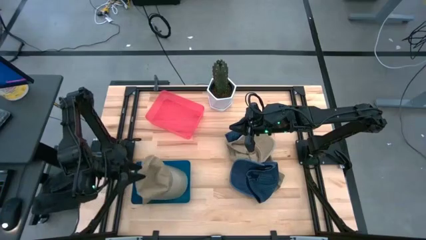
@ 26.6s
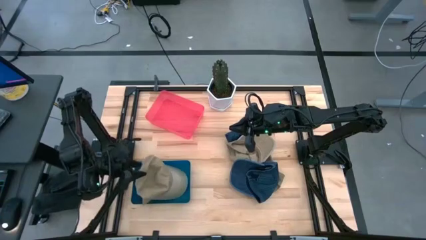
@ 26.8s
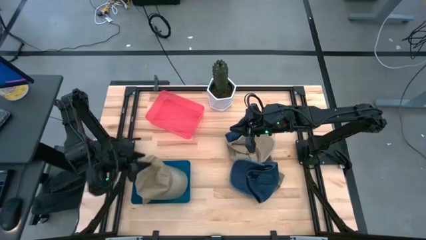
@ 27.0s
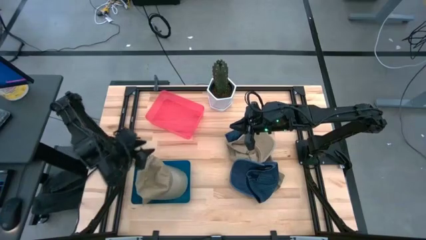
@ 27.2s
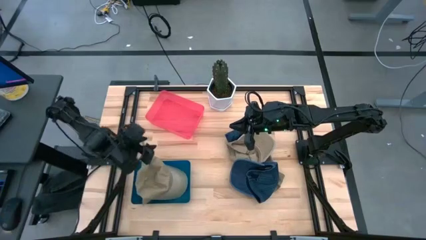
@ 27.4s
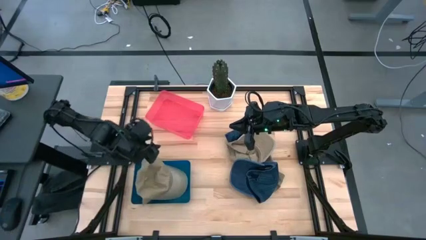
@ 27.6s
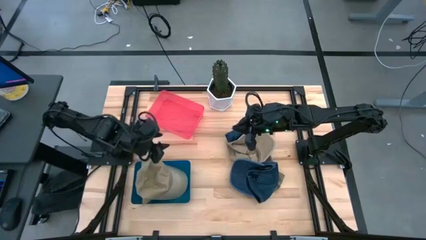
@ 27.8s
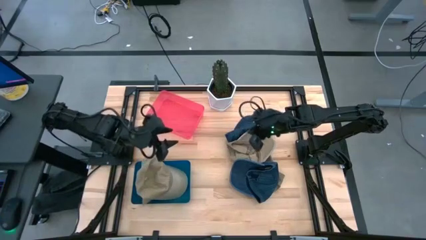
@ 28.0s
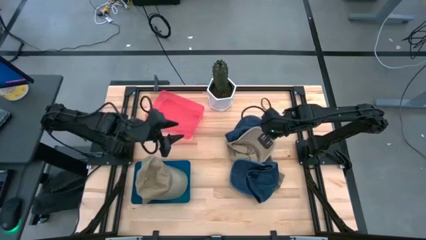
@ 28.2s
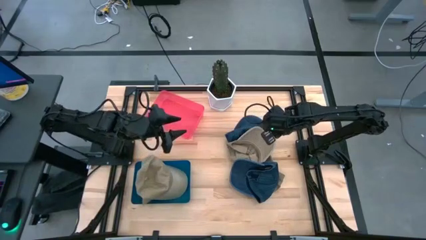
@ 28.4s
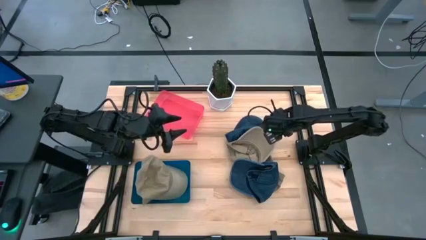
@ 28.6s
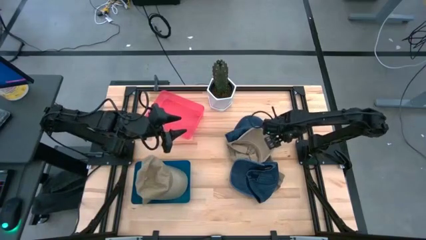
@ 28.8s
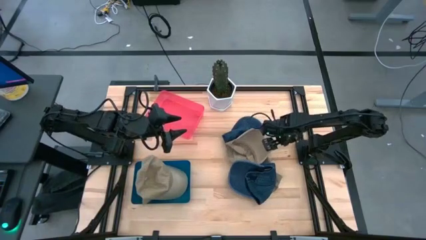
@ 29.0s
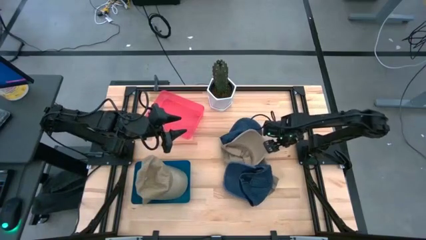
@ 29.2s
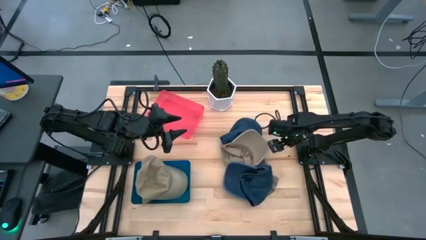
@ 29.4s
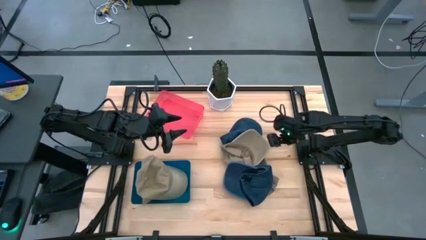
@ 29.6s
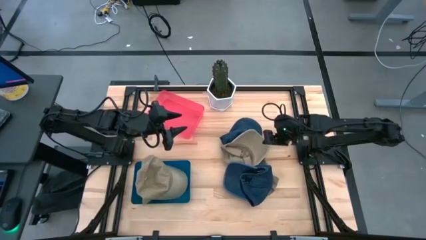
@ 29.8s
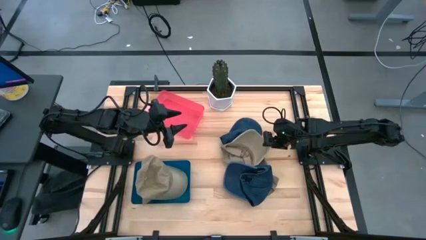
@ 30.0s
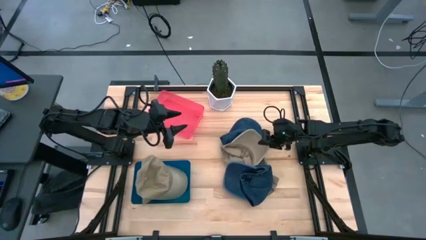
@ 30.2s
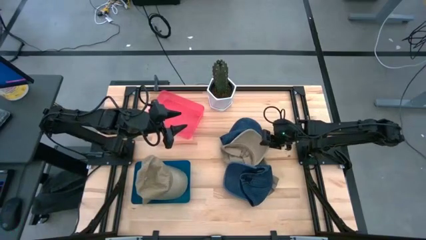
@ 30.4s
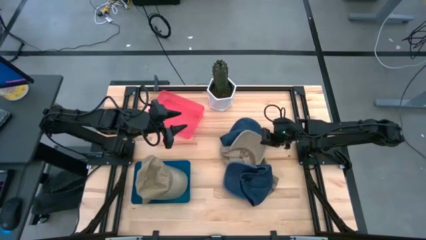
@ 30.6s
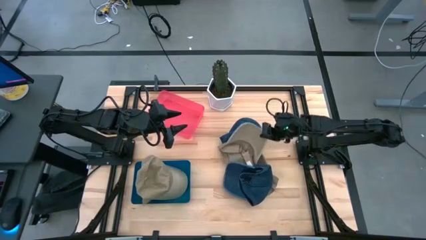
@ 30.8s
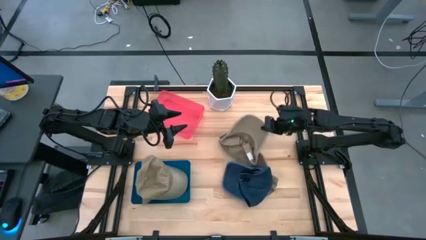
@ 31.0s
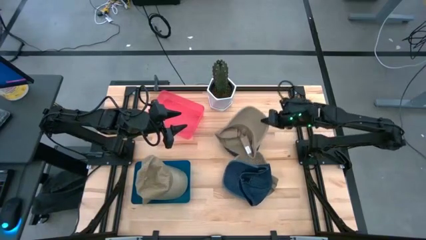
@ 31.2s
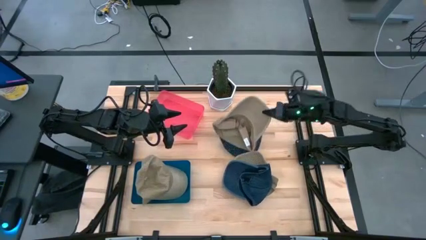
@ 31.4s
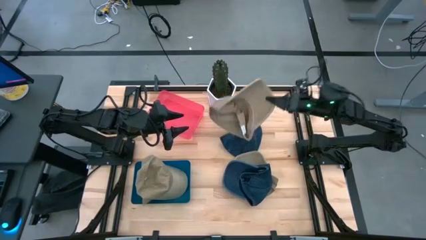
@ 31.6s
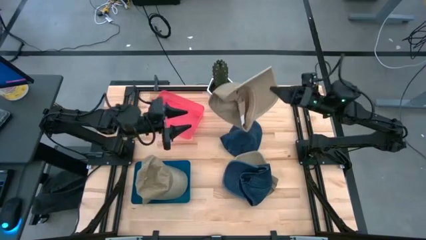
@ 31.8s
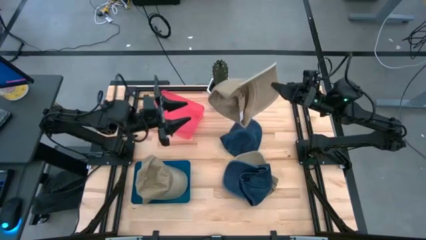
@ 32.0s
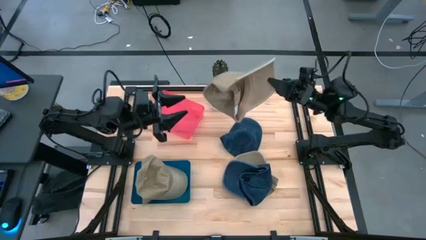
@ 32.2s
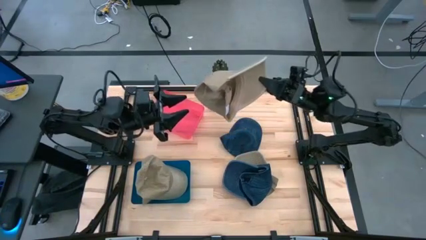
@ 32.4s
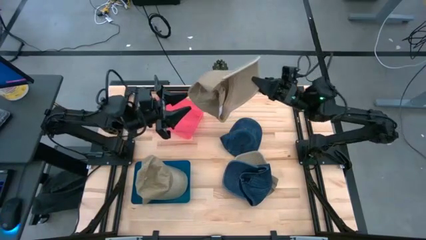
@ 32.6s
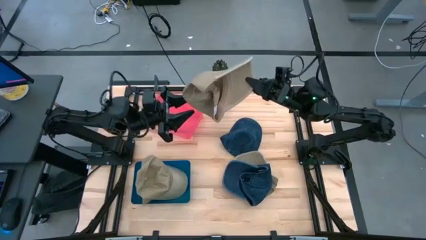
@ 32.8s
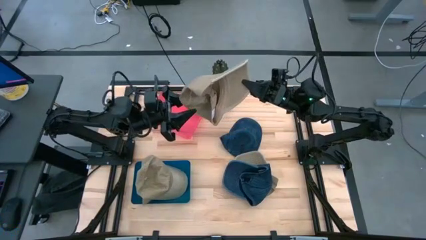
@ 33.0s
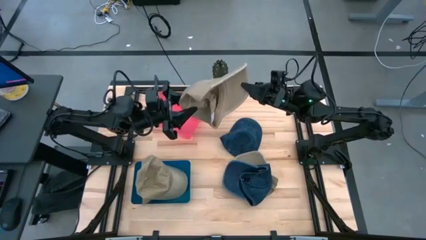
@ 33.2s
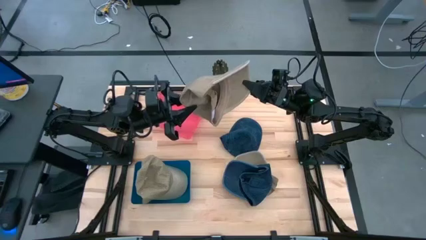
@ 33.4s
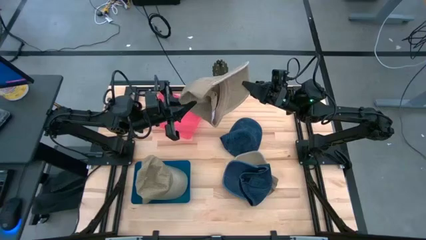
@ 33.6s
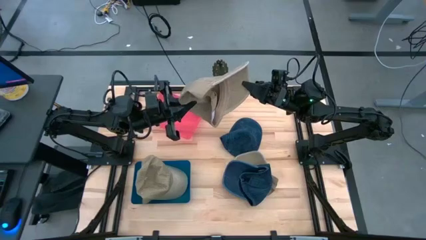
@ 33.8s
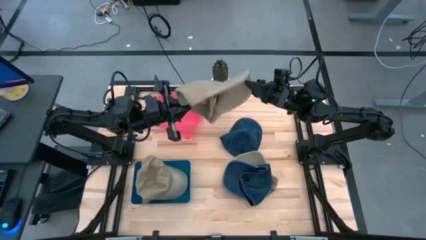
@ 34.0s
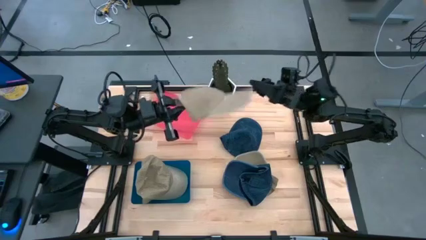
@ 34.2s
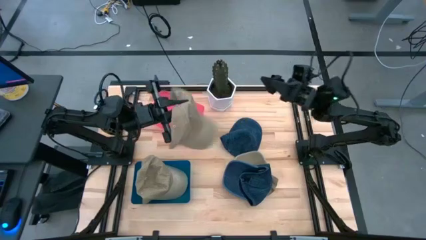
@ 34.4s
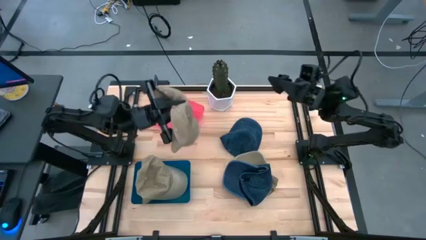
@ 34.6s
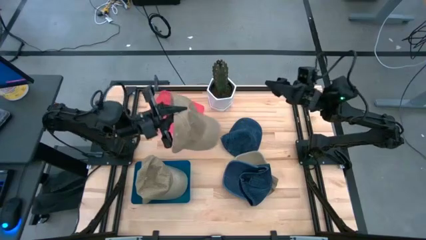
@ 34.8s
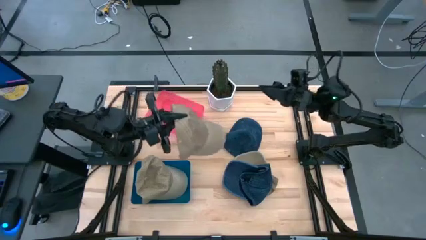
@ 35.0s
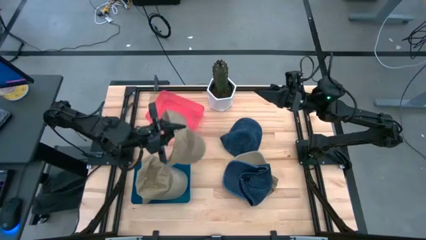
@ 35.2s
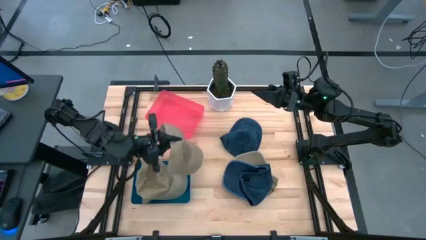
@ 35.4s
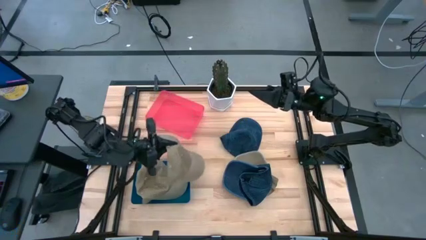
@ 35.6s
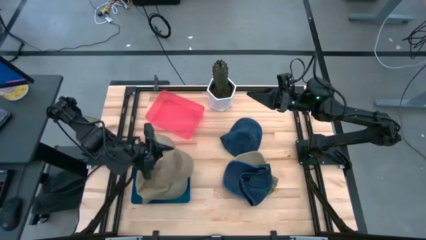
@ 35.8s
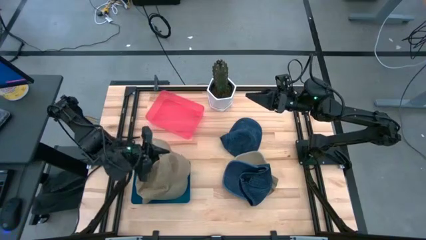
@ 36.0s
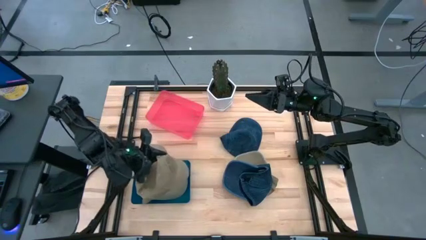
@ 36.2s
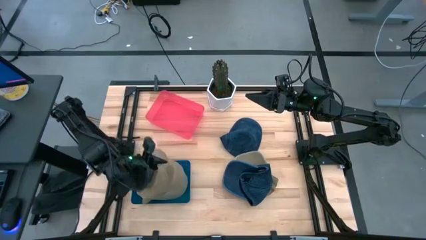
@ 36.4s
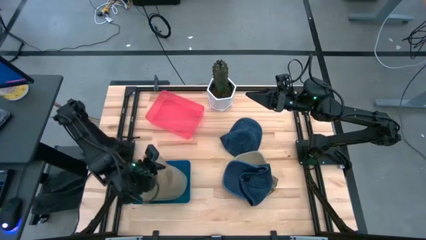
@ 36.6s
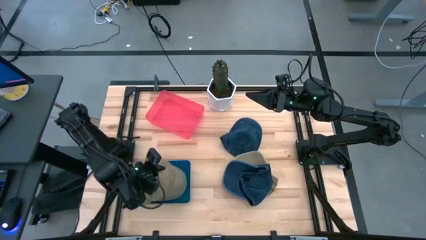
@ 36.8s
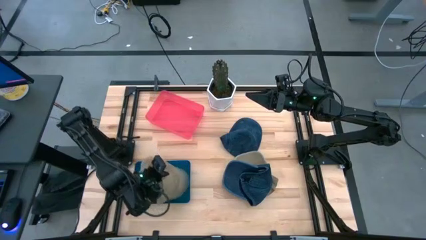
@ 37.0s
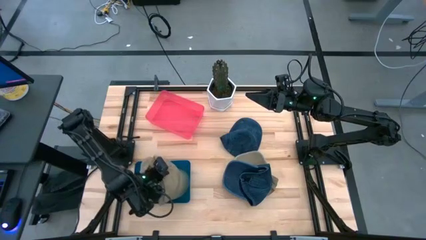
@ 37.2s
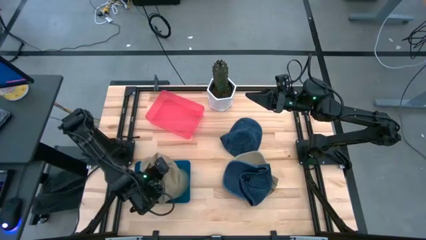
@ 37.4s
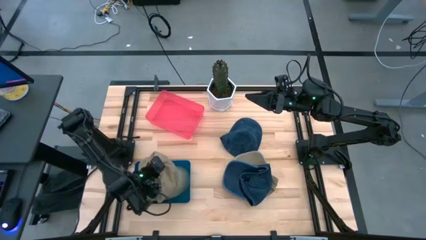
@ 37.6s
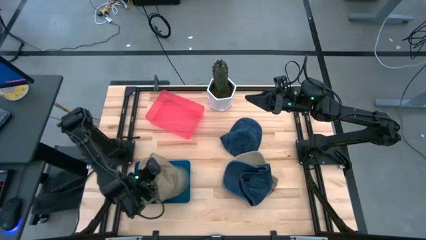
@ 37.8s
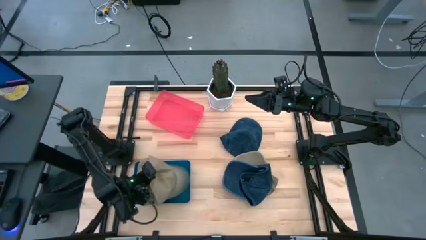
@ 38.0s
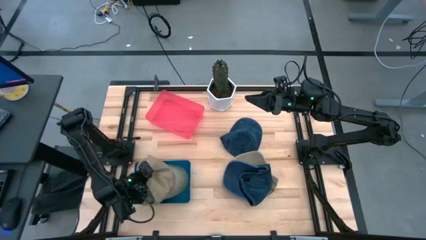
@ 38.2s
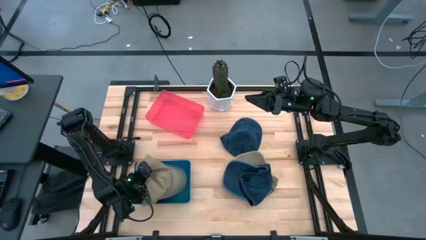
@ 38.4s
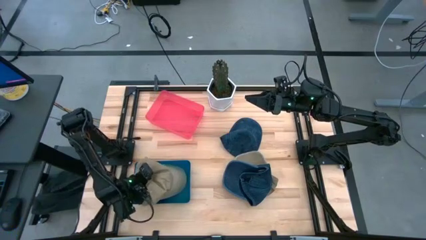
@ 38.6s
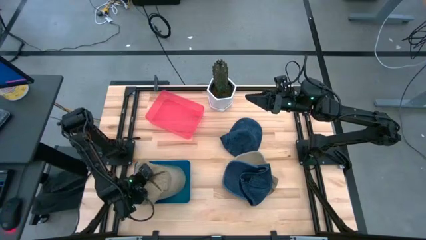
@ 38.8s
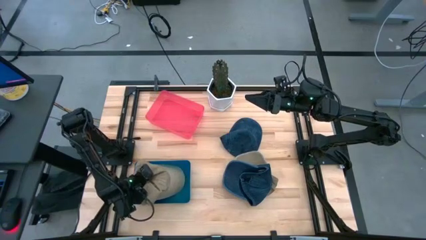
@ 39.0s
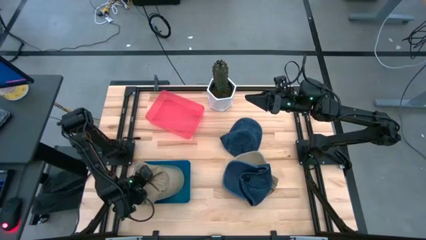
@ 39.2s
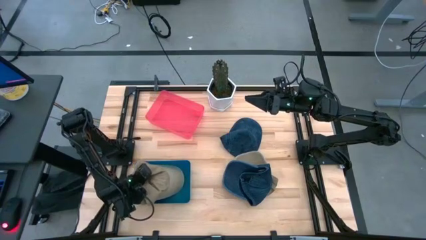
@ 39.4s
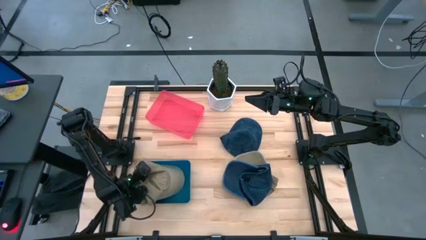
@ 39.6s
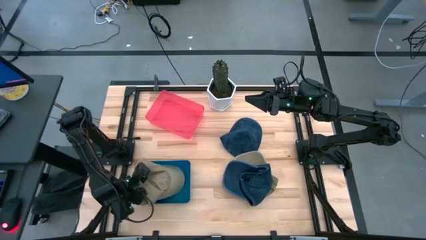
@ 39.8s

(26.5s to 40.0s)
Task: Pick & Place hat
Put the top brown cap into the blue bin
